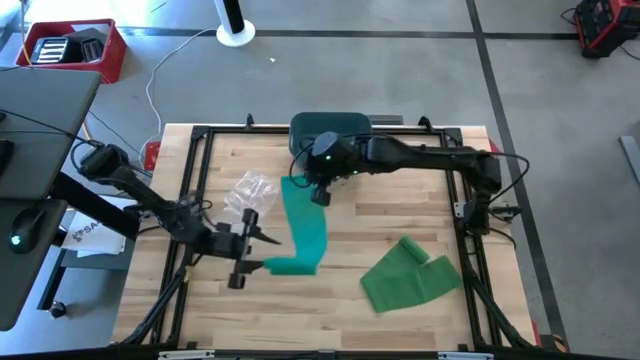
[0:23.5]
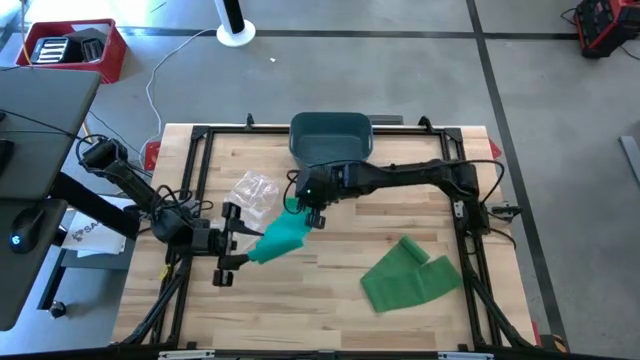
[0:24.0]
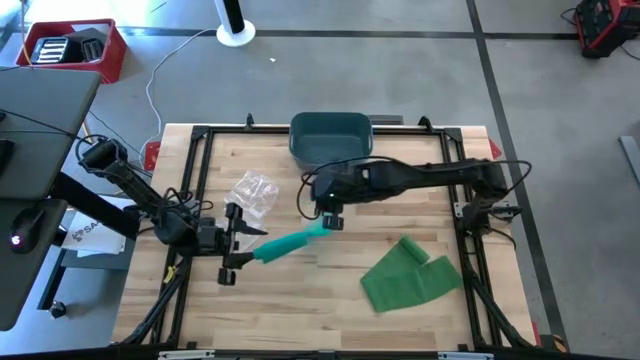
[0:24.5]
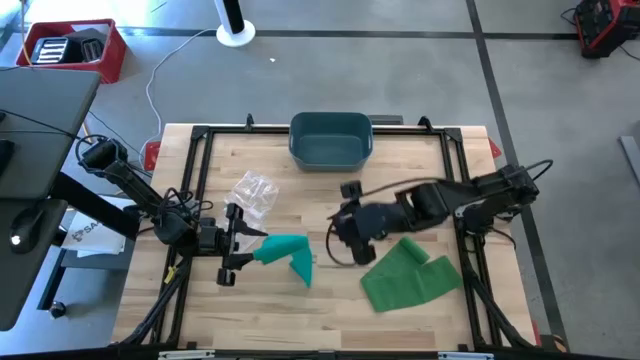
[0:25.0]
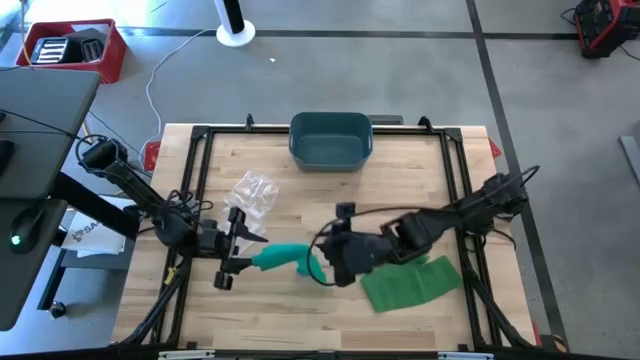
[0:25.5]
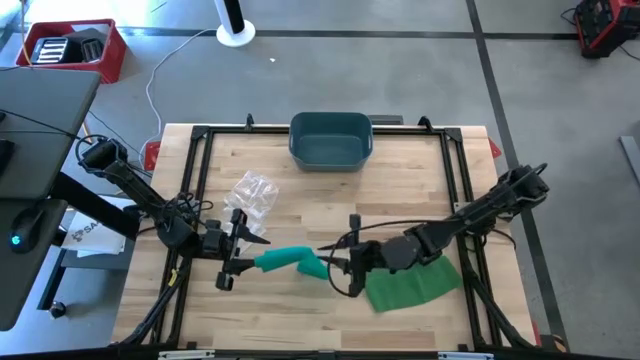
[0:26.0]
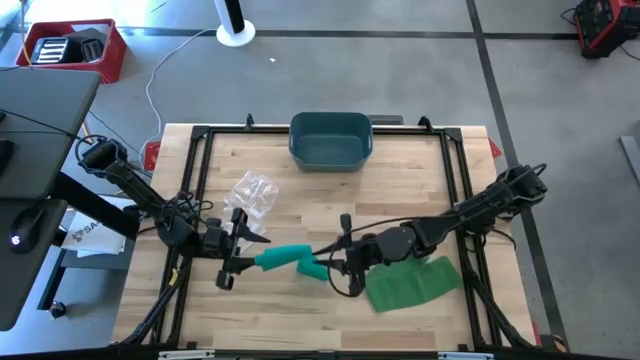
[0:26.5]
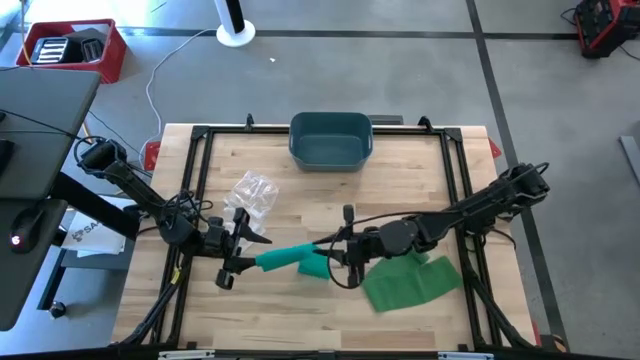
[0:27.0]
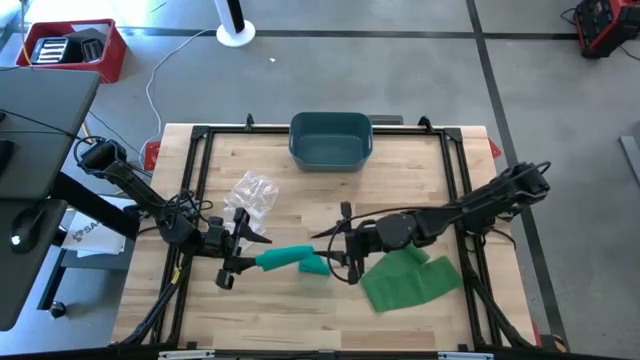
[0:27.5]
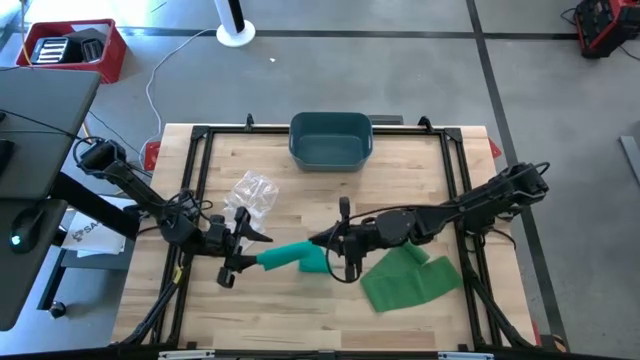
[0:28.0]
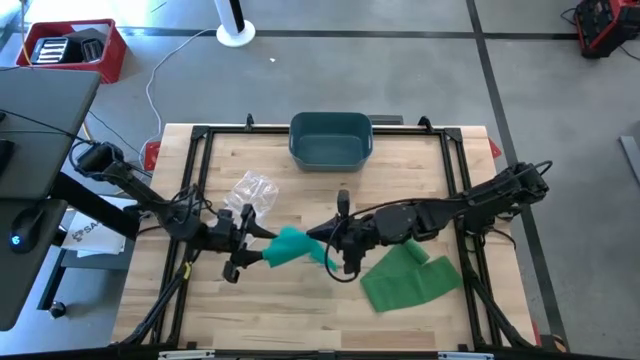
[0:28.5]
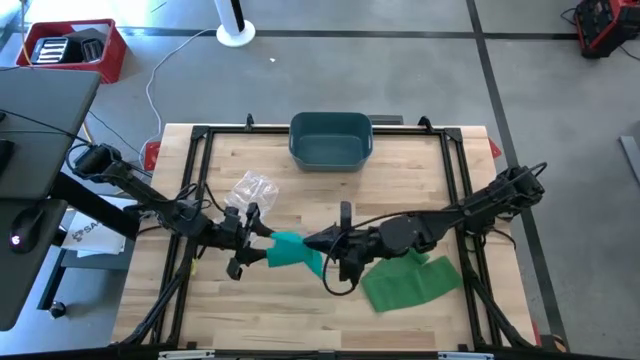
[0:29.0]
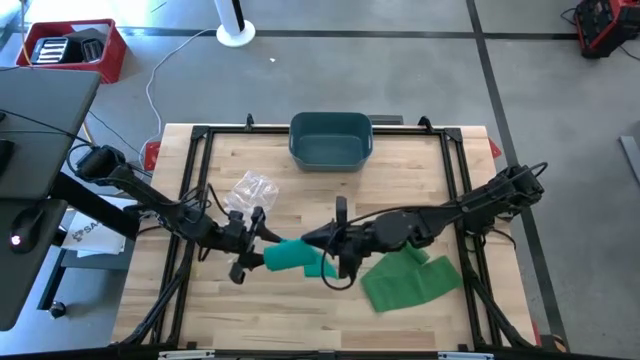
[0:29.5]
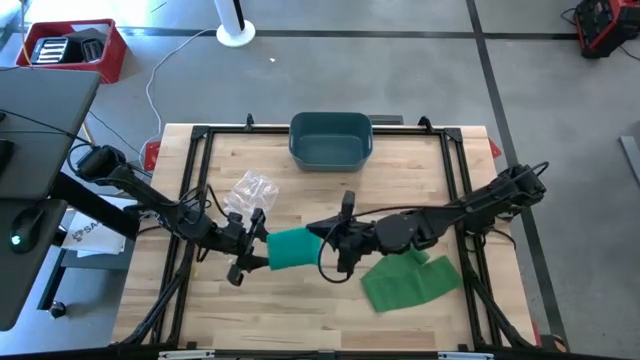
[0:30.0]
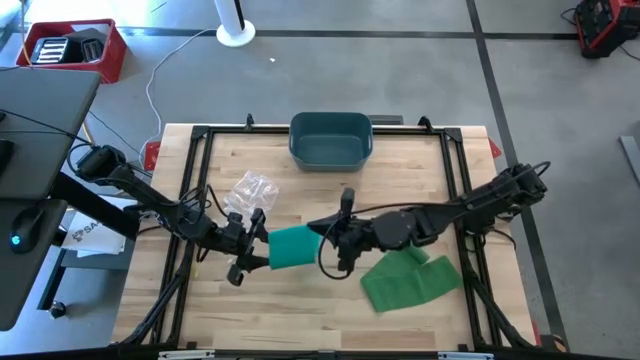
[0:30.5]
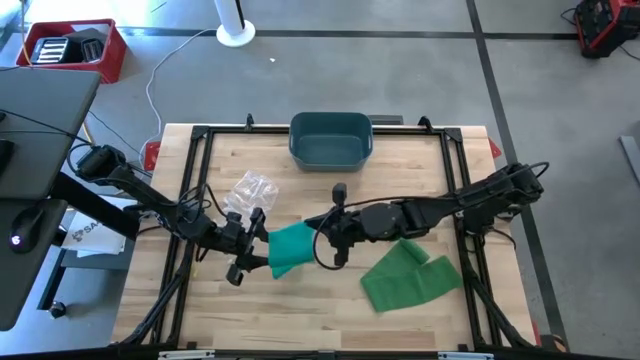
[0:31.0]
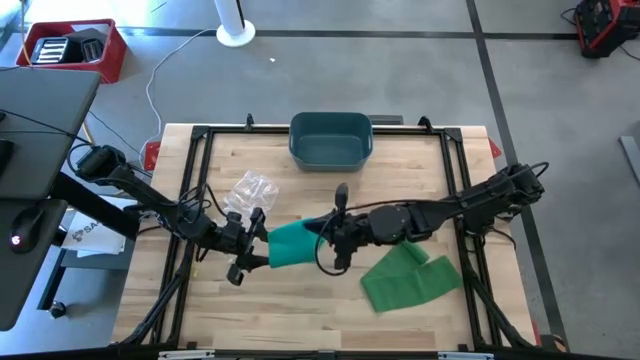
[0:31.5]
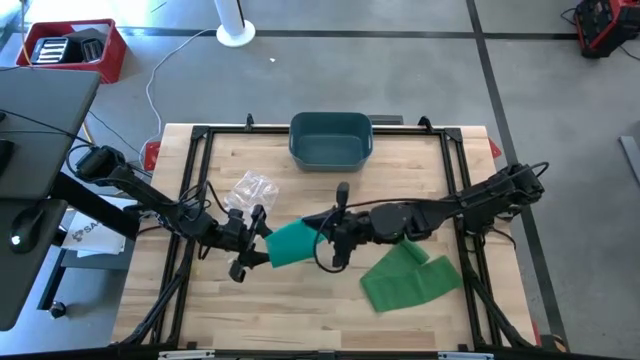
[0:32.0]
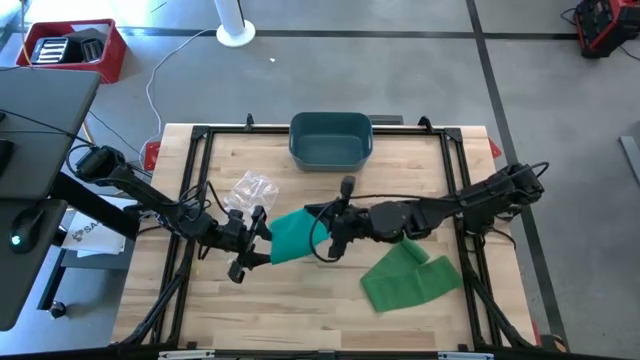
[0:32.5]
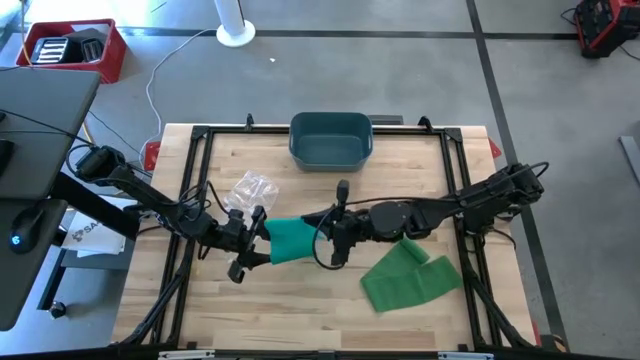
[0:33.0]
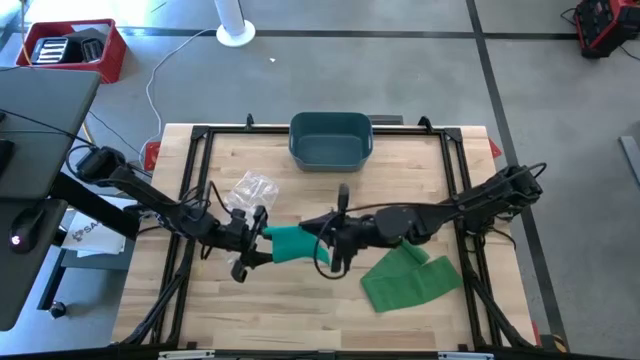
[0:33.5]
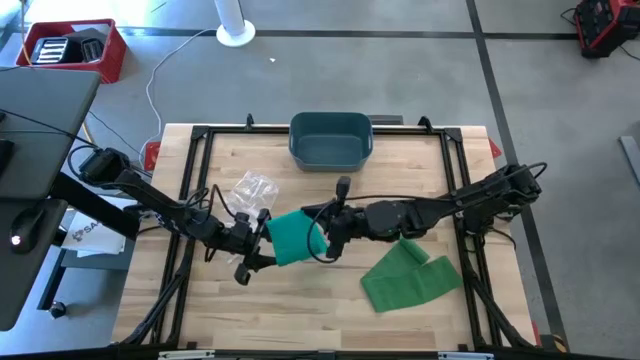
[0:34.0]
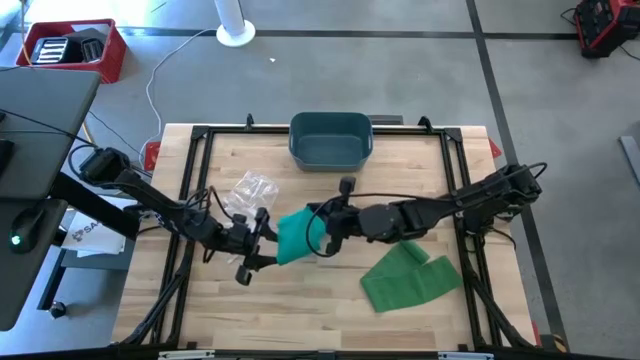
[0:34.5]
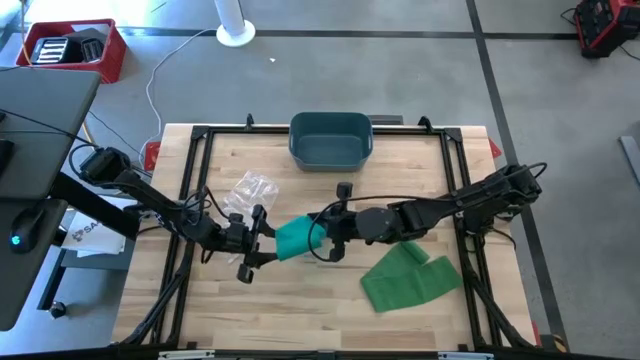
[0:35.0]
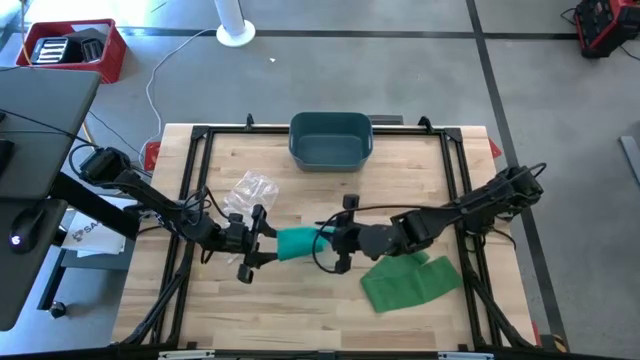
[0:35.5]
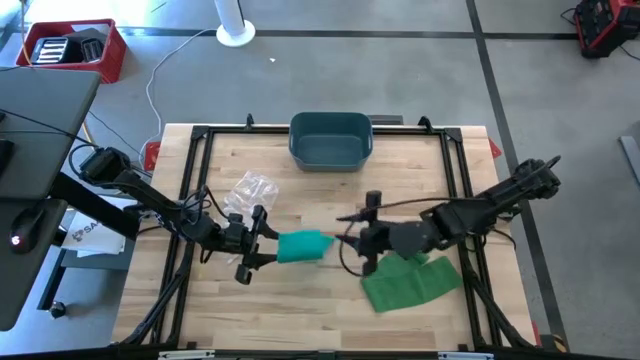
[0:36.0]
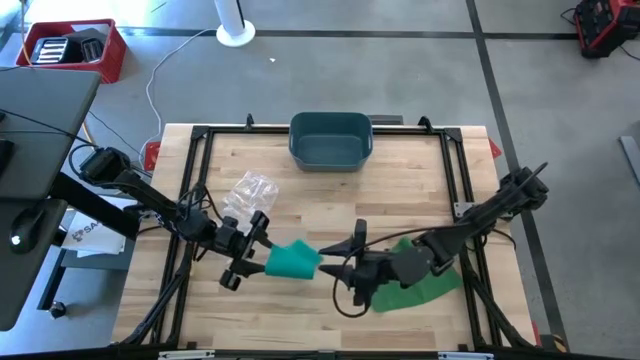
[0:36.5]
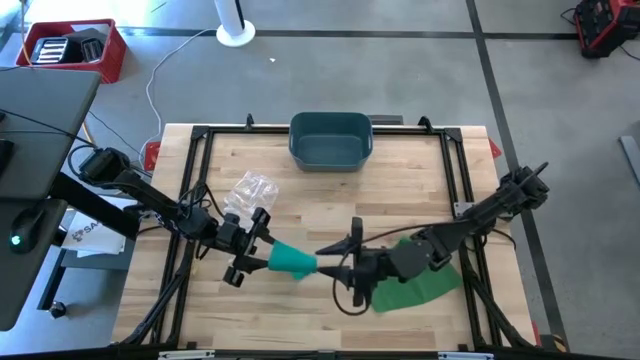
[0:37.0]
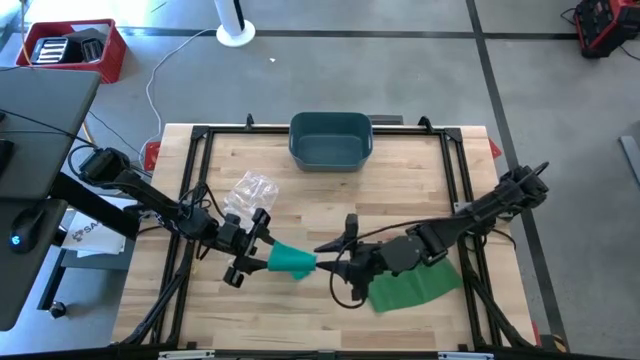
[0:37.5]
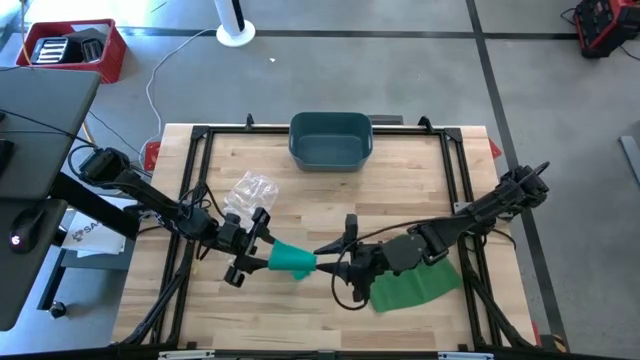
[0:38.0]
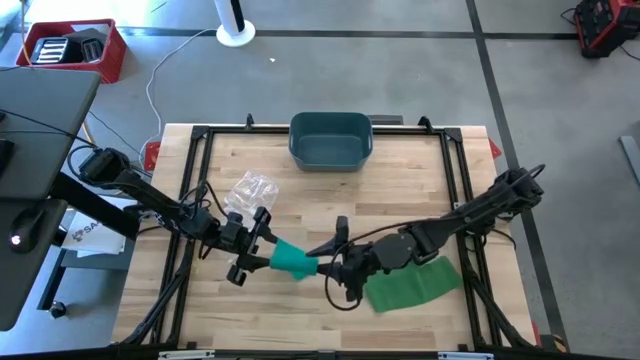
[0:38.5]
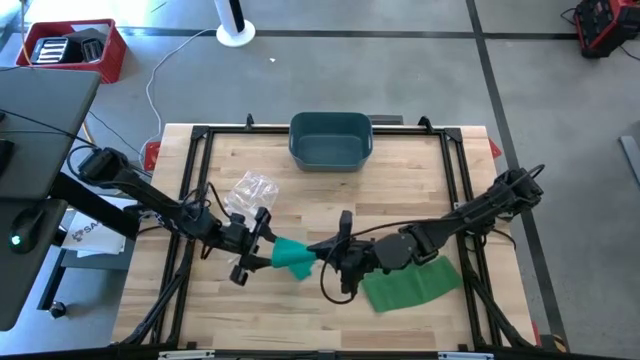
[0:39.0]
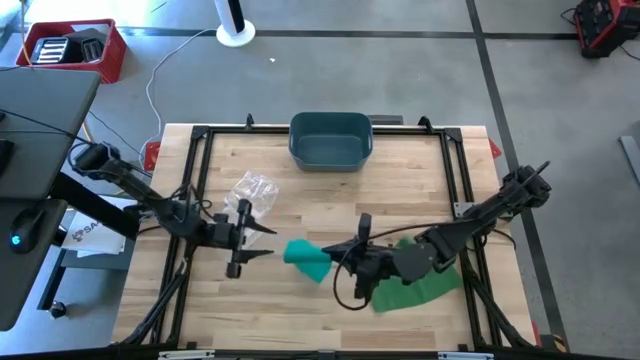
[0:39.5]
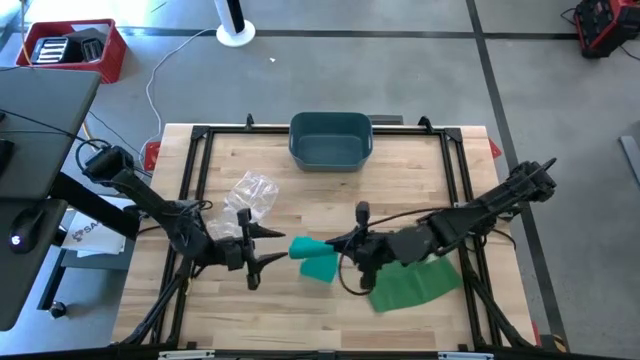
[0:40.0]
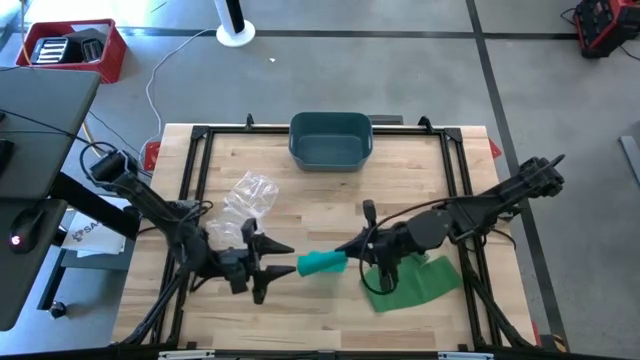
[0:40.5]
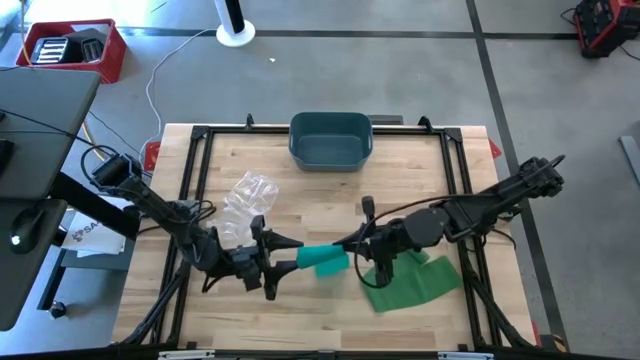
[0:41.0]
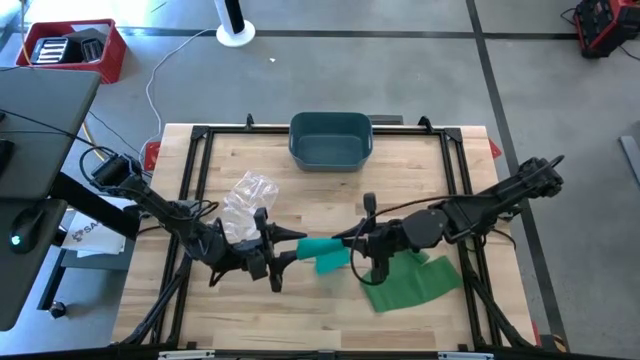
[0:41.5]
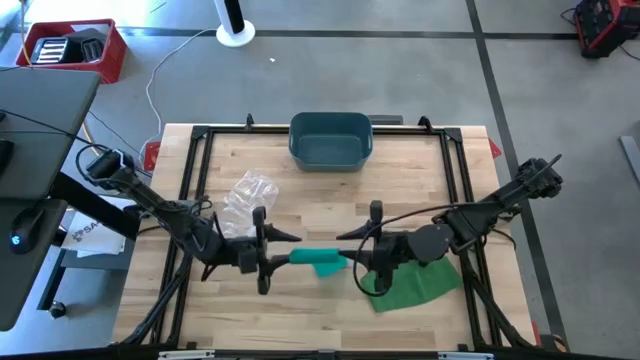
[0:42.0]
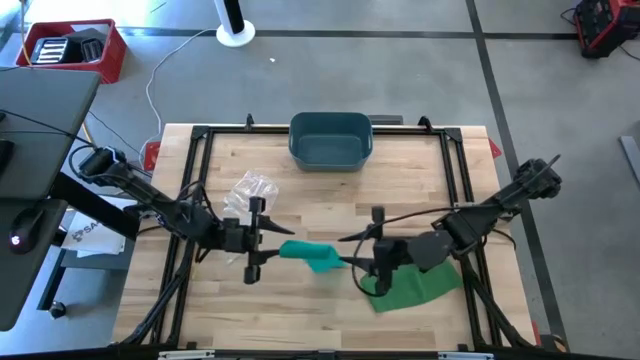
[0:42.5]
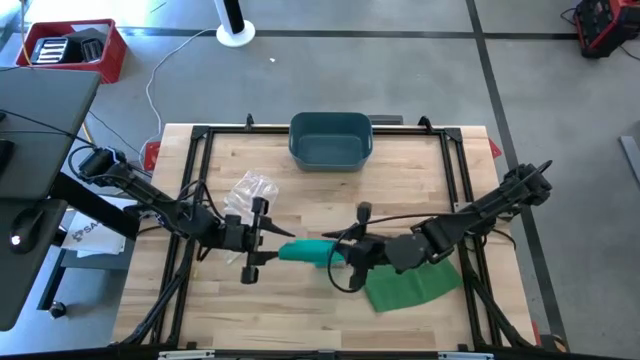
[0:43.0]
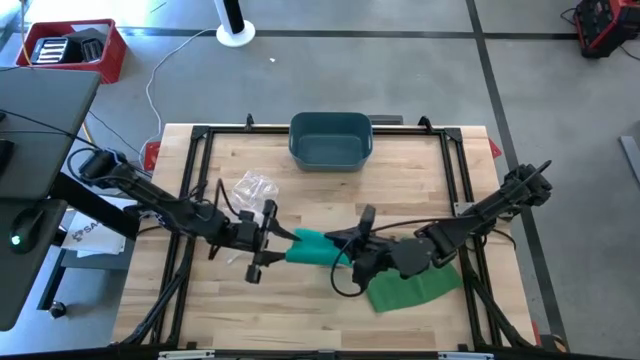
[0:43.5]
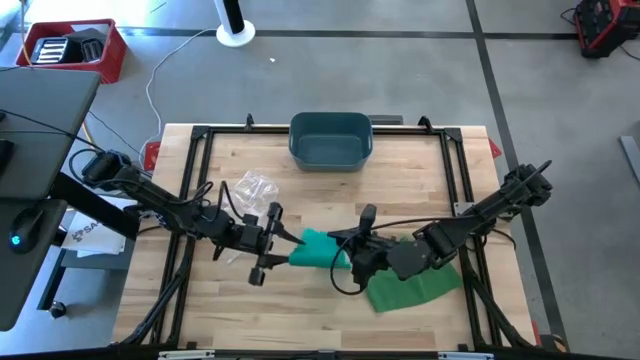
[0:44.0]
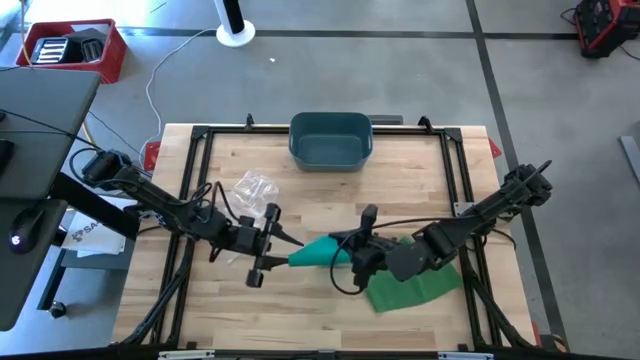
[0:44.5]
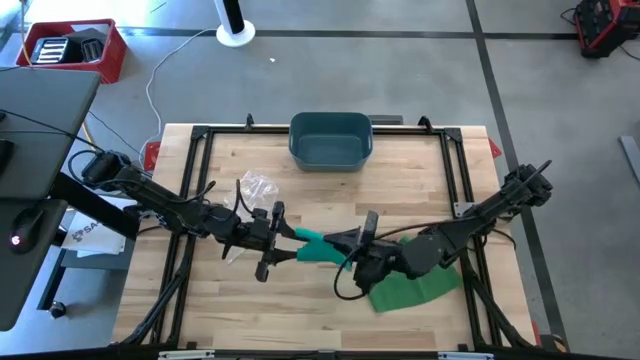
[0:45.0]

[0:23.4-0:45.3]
Task: Roll bandage
Roll the blue bandage
